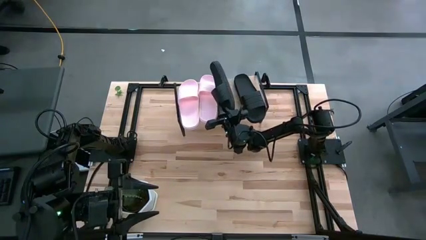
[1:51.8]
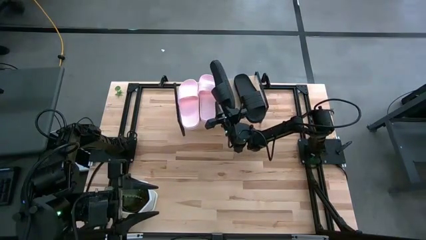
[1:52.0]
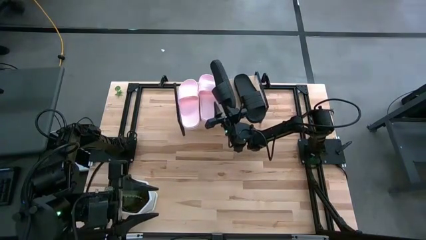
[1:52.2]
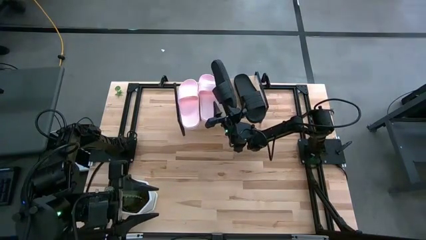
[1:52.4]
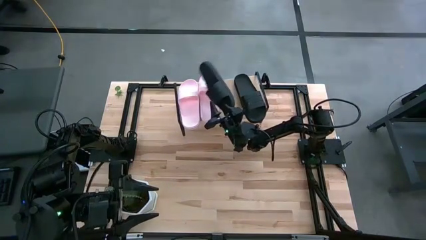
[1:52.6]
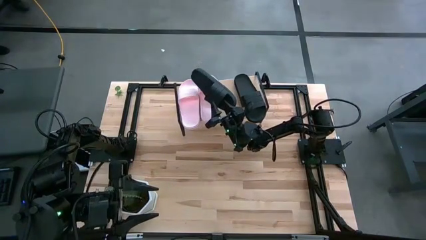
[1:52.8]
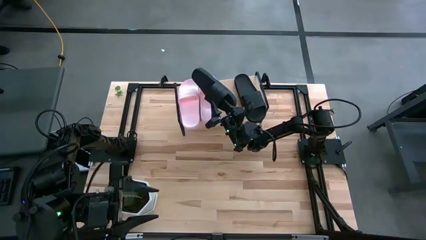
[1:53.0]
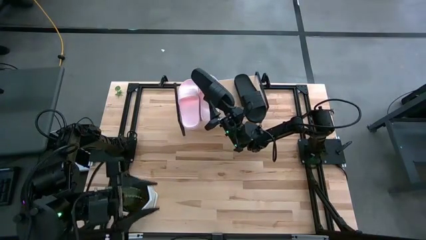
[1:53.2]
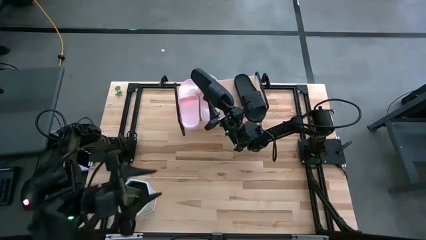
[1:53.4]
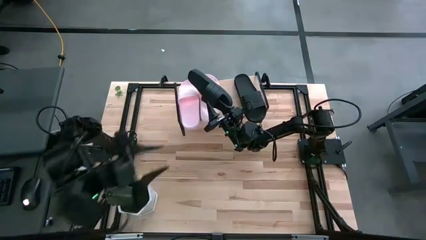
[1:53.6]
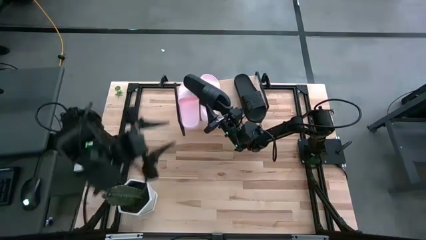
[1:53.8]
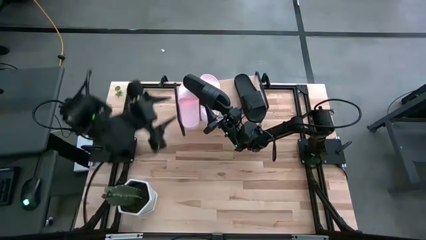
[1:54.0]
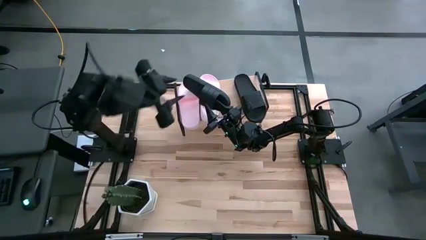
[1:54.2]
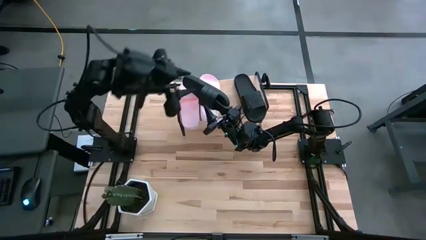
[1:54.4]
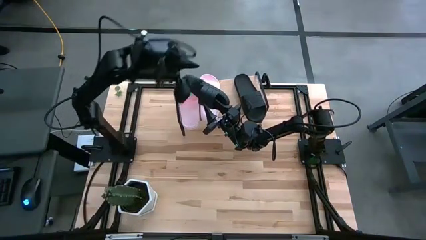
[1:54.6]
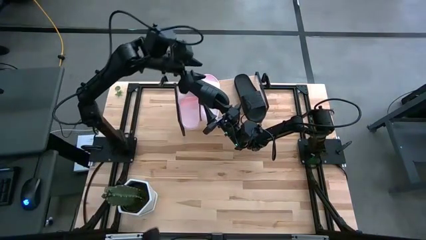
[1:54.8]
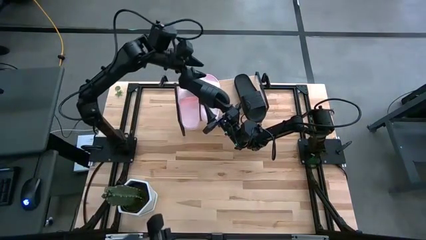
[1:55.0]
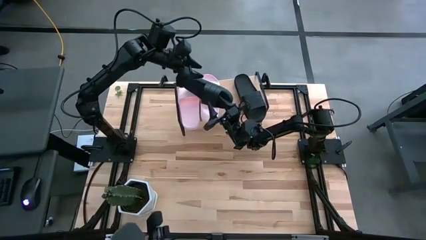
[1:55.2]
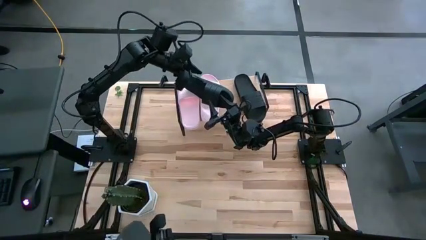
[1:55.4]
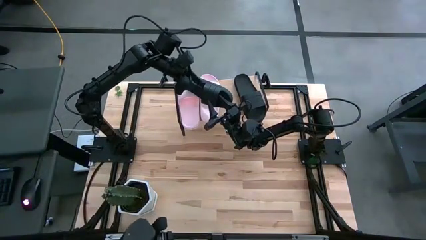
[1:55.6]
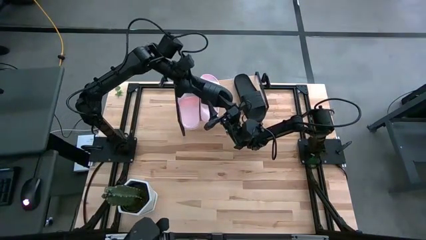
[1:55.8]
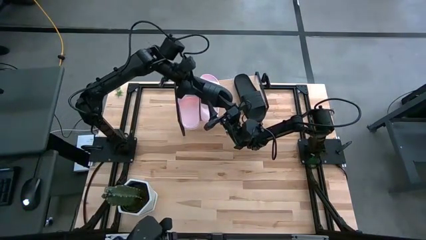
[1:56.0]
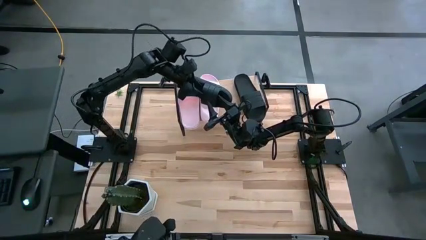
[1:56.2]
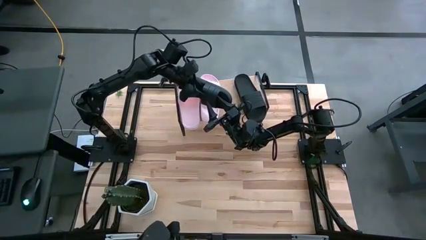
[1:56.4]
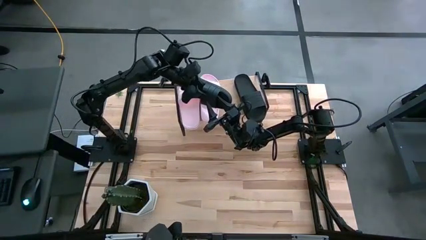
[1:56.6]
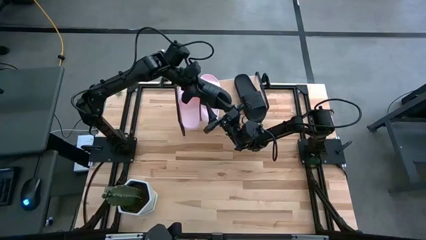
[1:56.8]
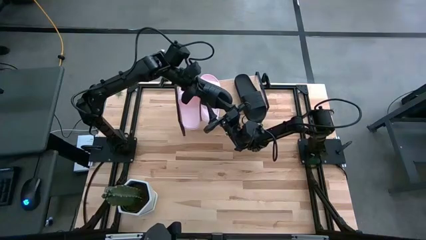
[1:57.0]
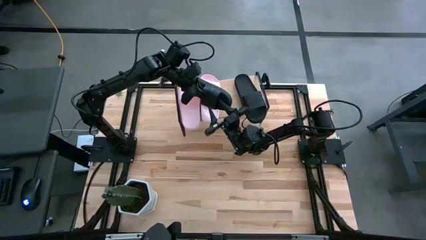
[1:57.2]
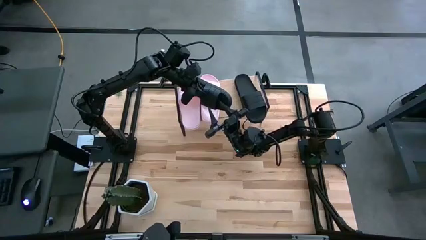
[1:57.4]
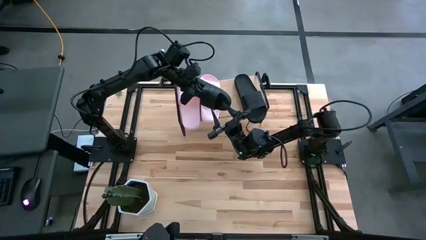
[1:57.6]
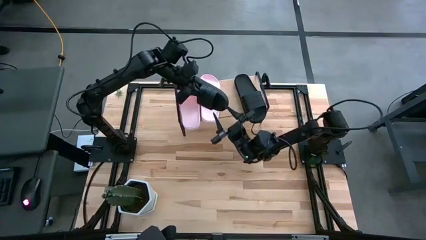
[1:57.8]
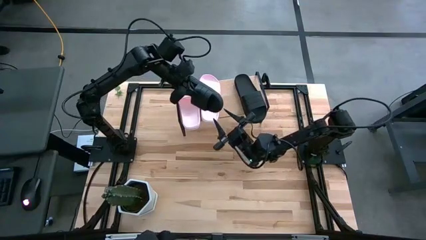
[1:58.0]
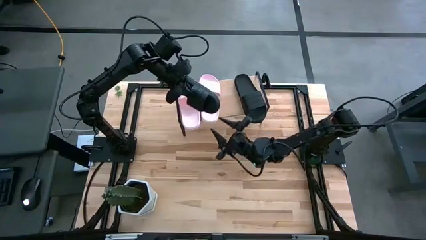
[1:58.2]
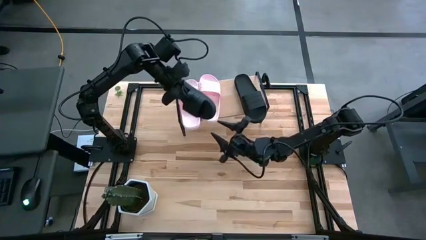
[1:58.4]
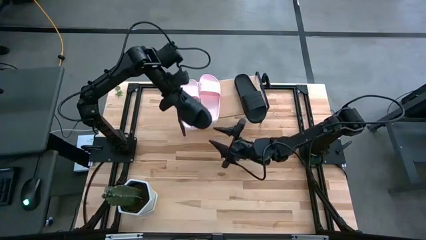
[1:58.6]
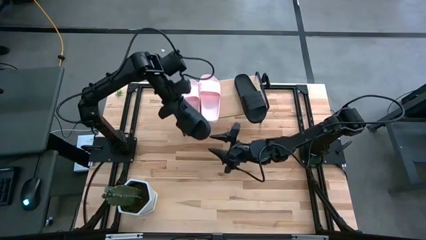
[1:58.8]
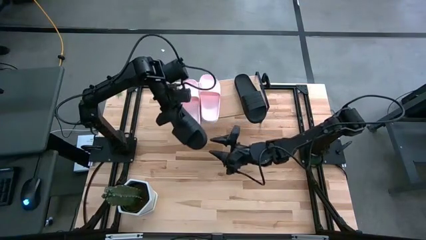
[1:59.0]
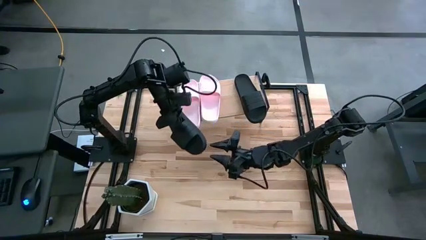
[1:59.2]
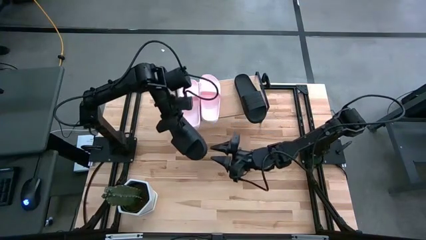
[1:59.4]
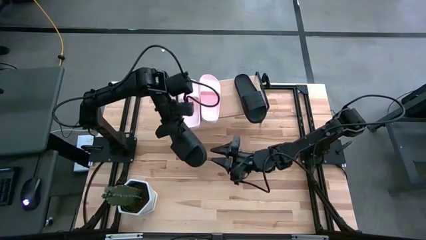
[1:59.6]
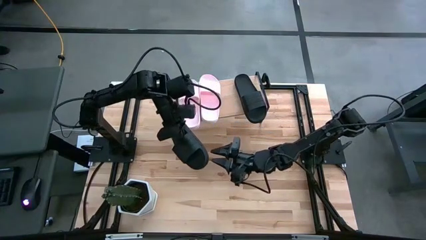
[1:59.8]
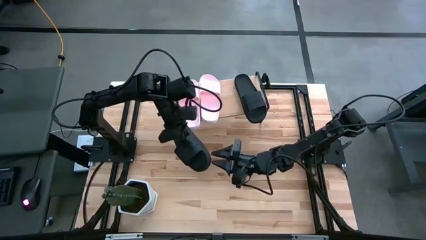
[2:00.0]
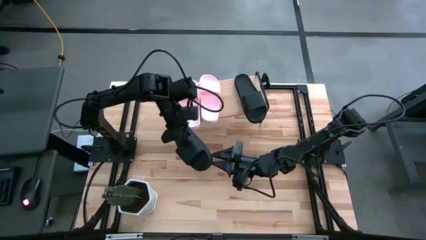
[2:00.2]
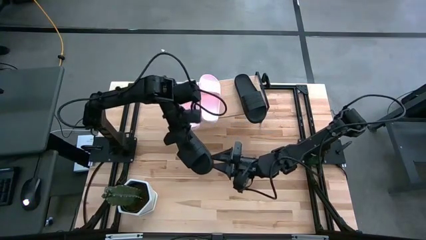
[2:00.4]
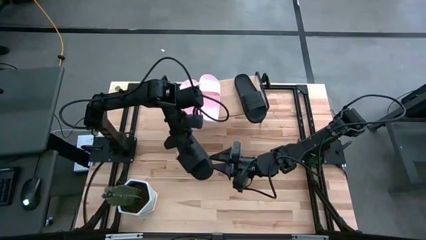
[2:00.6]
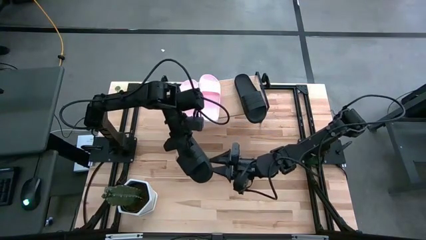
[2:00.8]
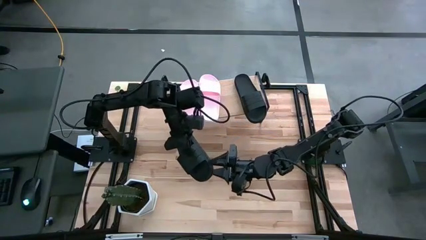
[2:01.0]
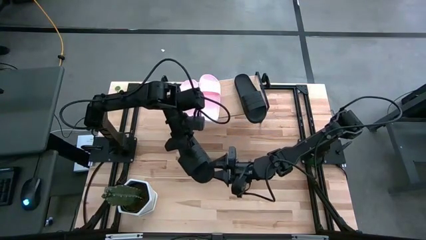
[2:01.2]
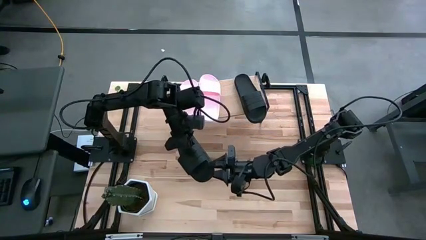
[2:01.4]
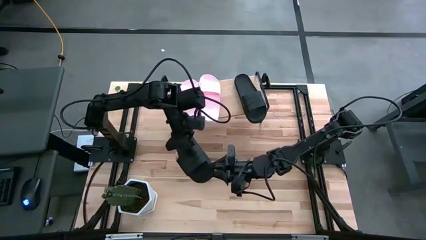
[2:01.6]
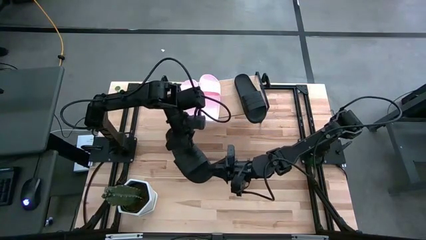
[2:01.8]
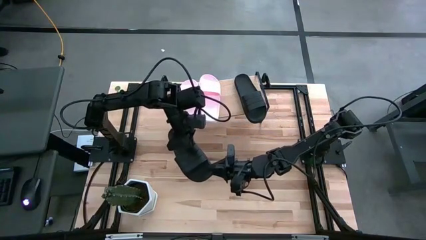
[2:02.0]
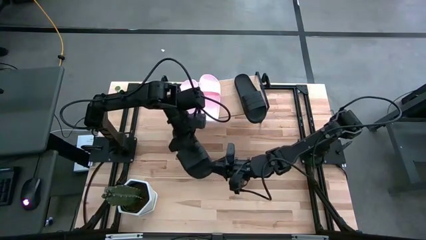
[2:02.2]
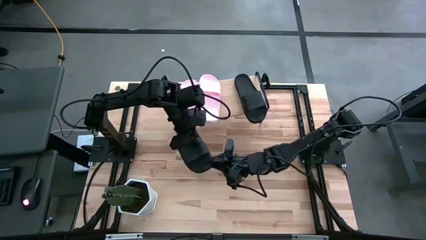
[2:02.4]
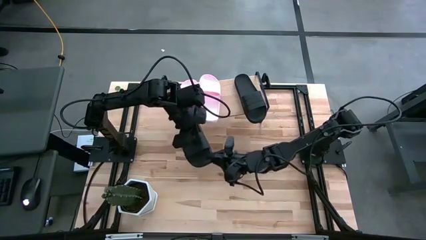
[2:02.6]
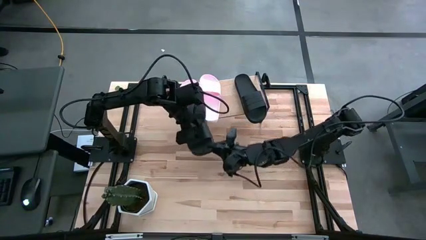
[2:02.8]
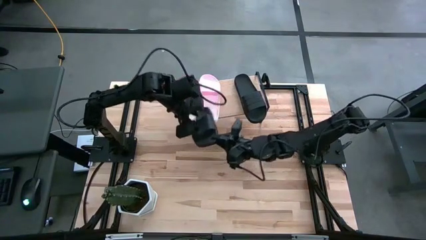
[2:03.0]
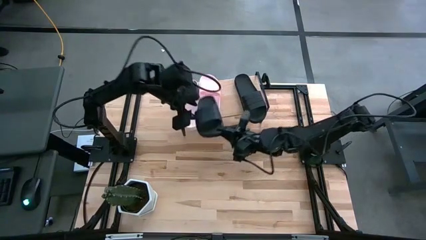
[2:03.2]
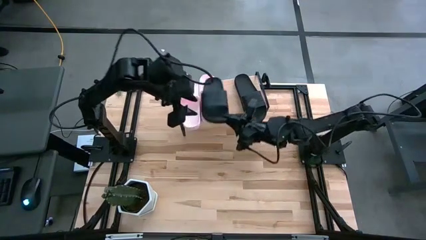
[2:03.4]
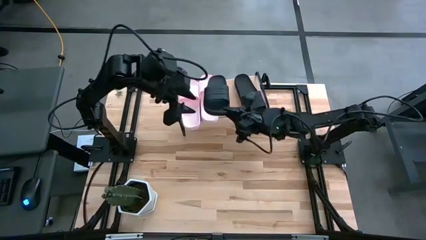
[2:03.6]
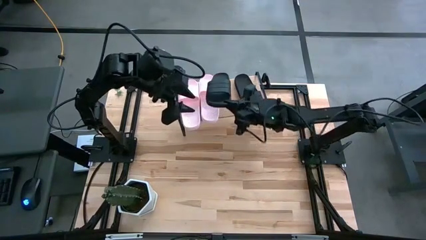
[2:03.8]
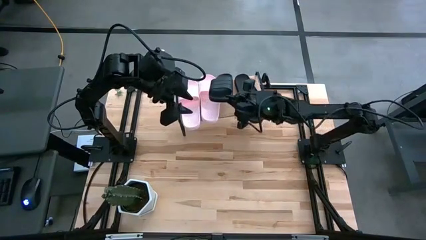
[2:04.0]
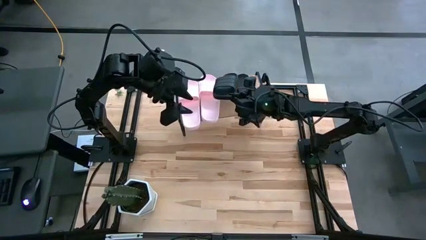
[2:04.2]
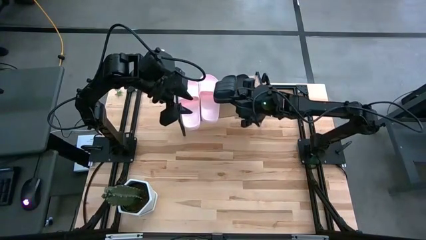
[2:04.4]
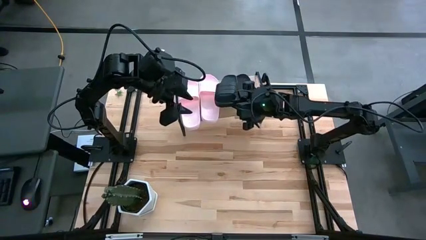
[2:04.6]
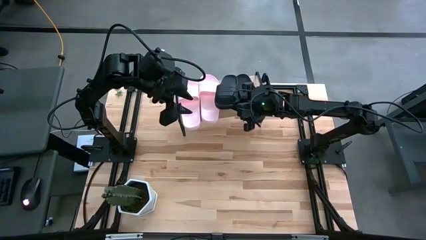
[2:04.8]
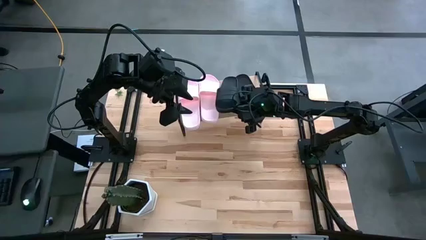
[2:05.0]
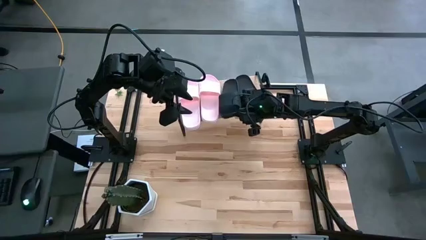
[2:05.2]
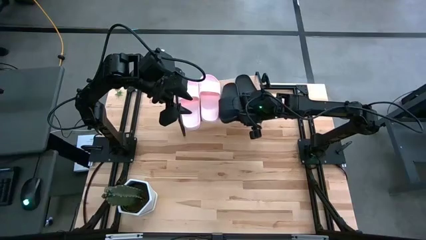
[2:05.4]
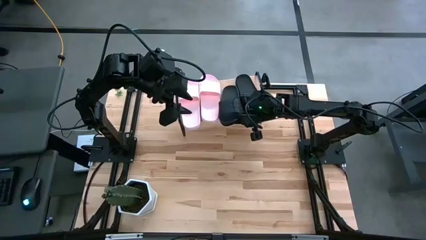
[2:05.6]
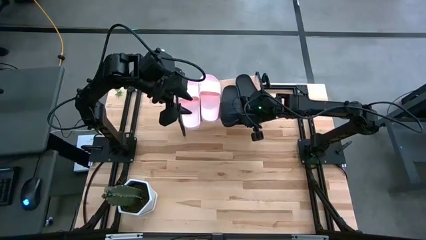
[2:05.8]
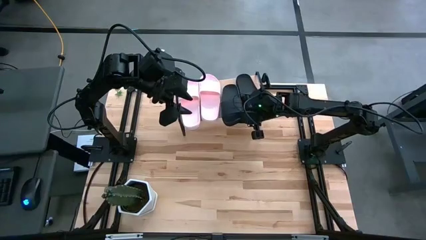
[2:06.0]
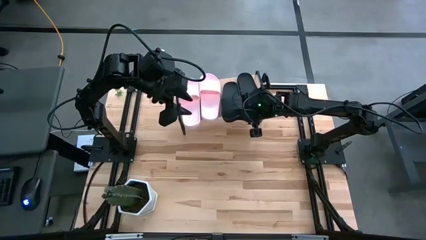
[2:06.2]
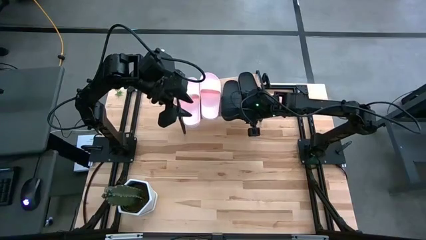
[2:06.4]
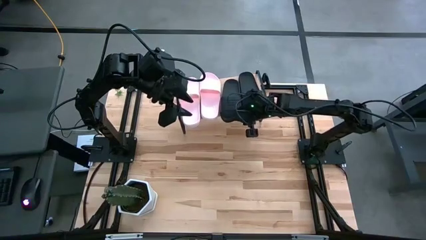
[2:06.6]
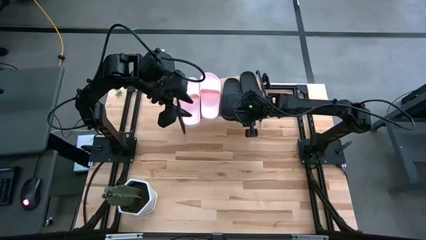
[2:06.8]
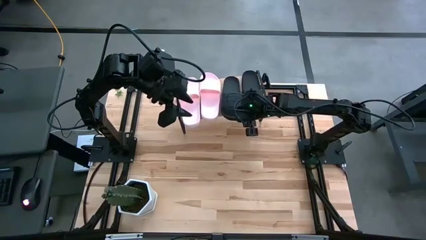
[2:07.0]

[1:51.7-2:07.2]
Task: Pick and place slides into the shelf
Put the black slipper on the shelf

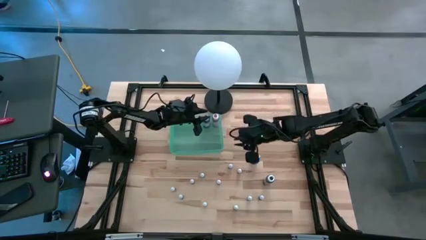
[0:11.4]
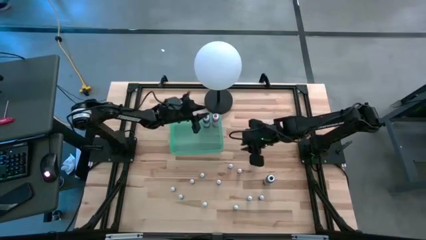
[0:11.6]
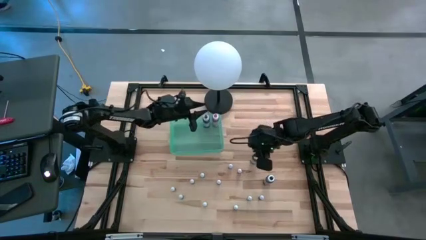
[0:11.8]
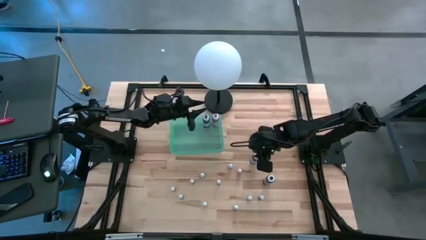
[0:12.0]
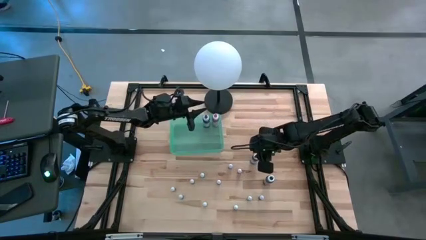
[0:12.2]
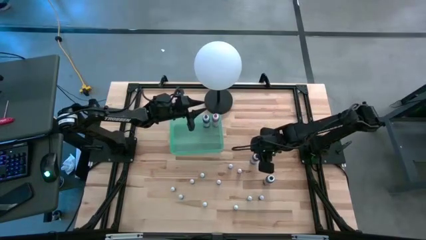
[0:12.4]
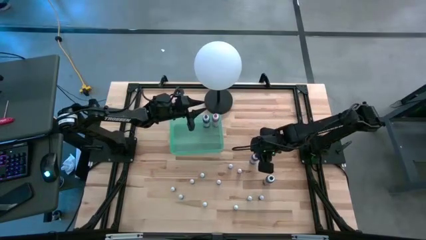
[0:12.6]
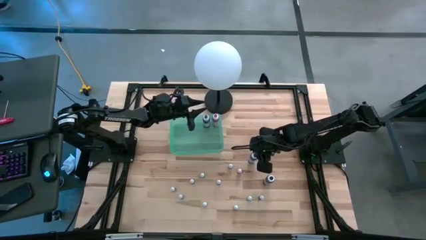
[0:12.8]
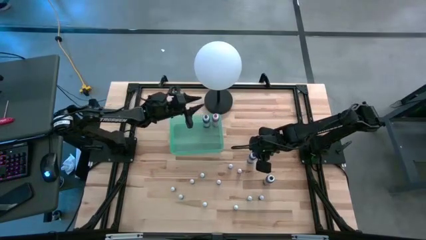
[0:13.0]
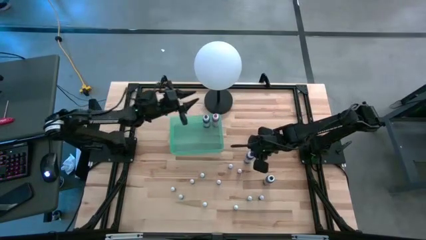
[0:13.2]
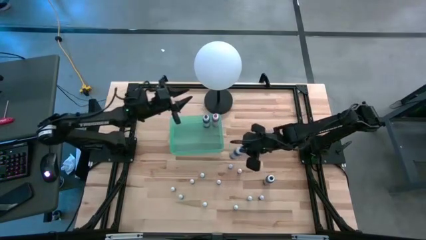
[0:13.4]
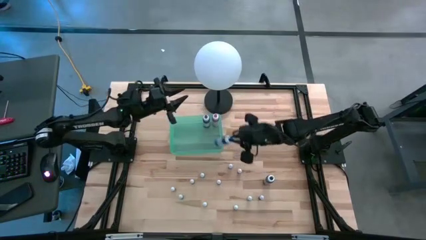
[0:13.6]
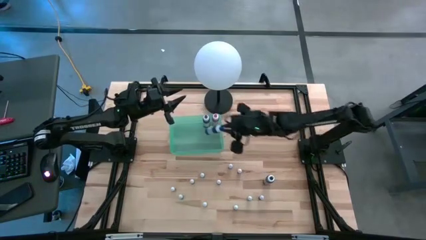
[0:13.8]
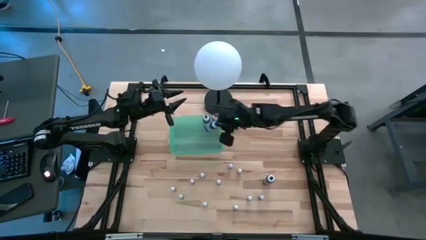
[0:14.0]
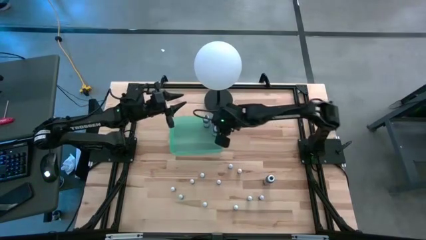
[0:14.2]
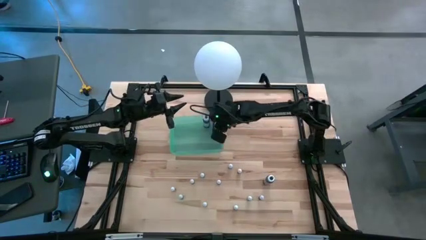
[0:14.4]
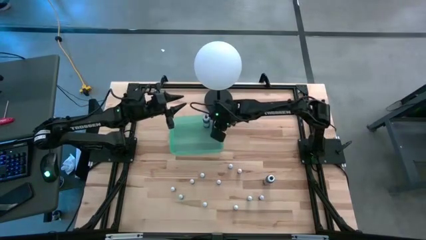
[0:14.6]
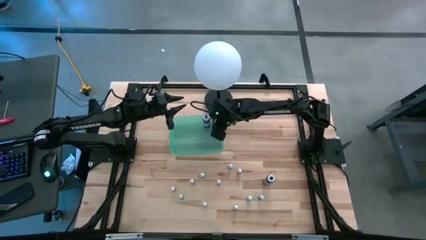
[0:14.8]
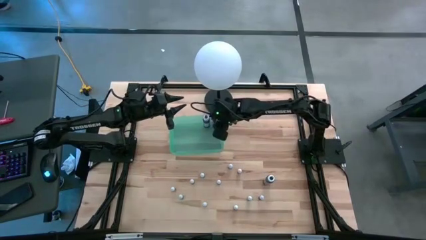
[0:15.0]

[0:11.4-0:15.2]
Task: Pick & Place food coloring
Put the big blue food coloring bottle into the green bin
